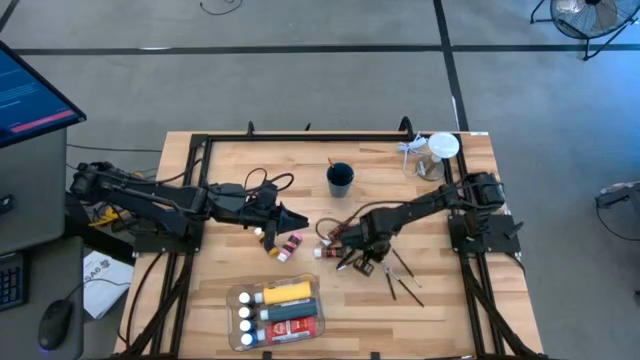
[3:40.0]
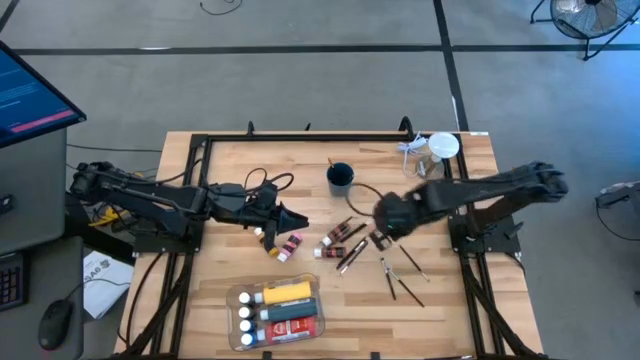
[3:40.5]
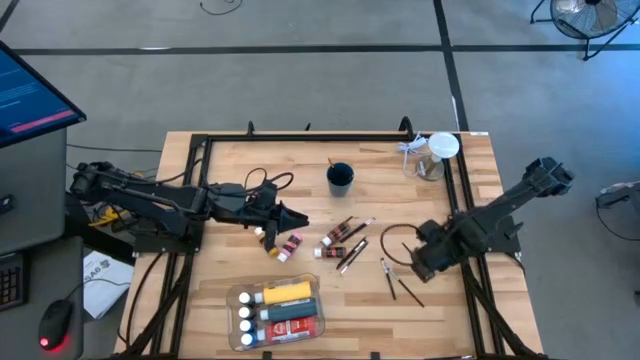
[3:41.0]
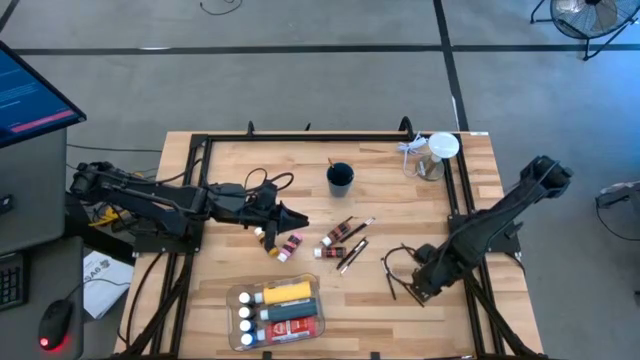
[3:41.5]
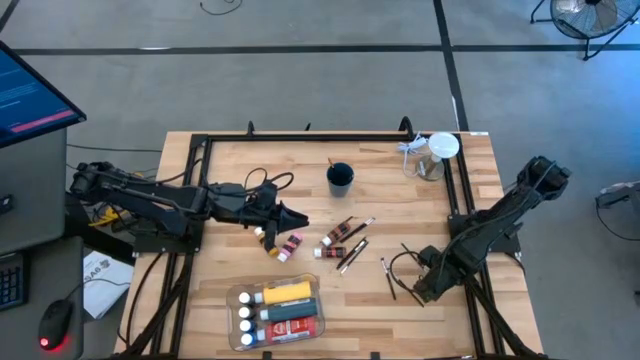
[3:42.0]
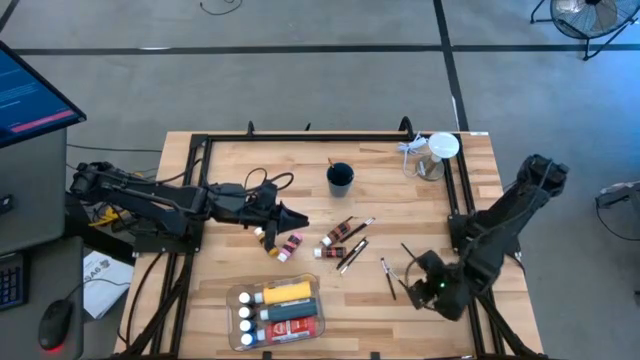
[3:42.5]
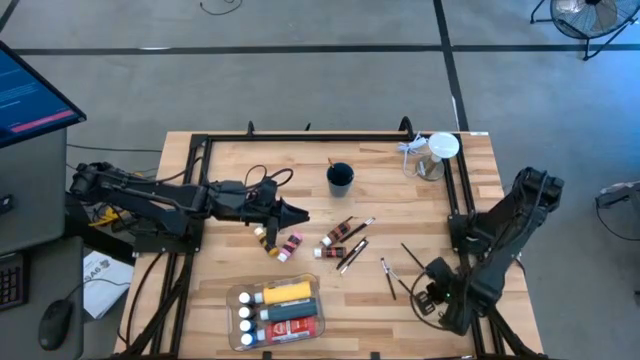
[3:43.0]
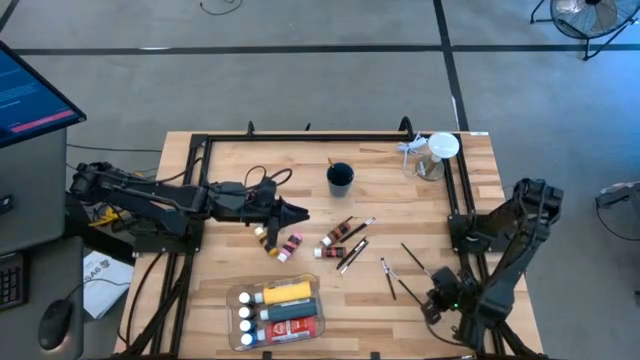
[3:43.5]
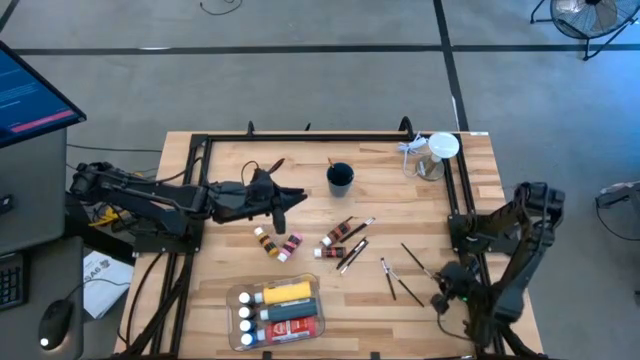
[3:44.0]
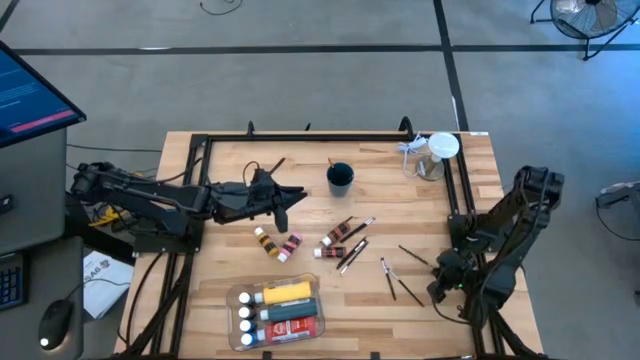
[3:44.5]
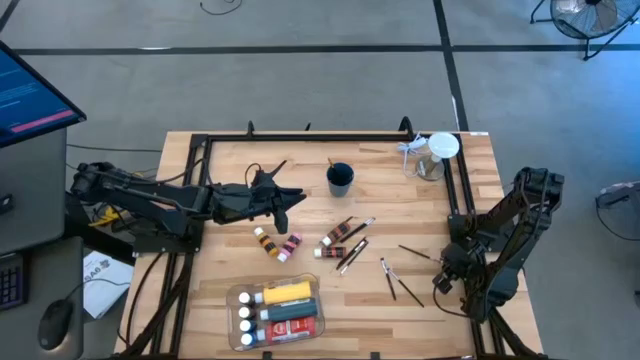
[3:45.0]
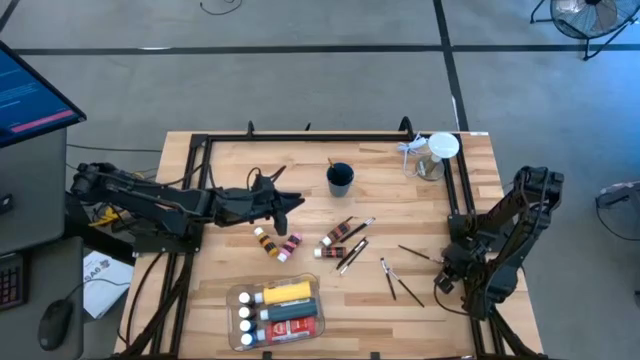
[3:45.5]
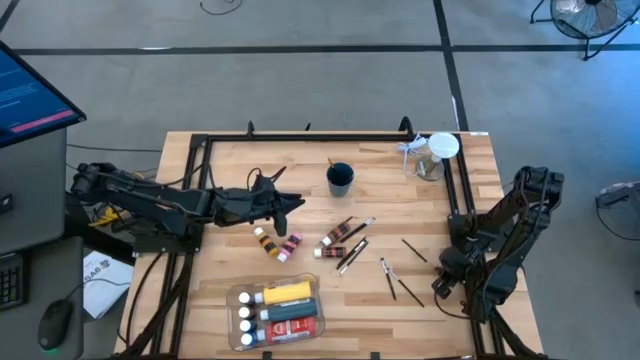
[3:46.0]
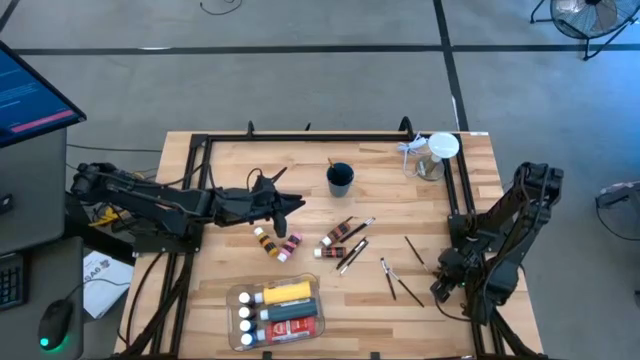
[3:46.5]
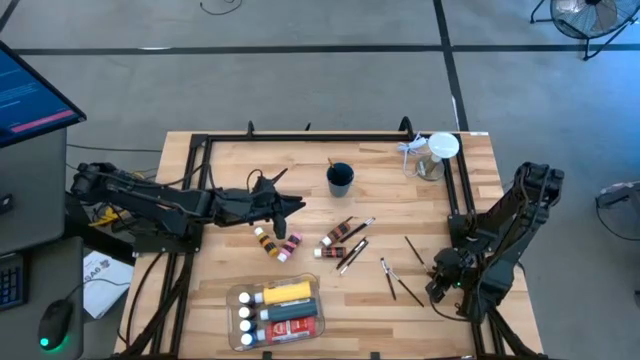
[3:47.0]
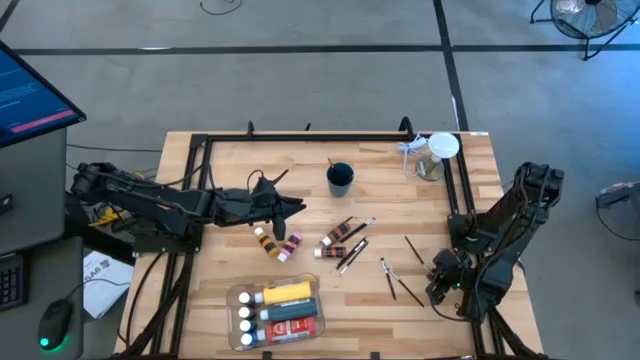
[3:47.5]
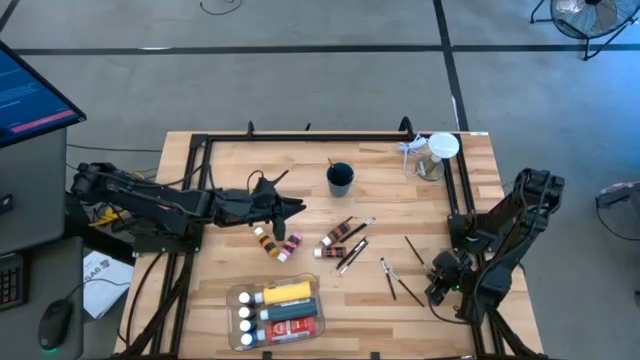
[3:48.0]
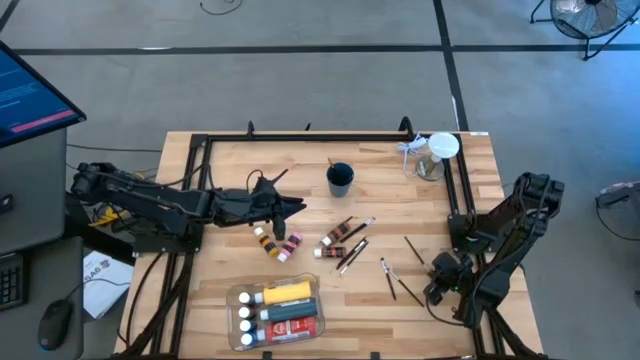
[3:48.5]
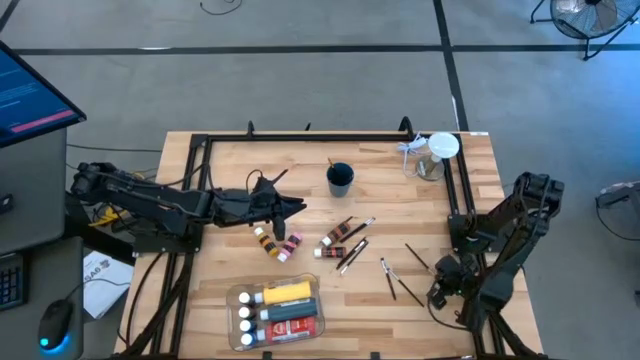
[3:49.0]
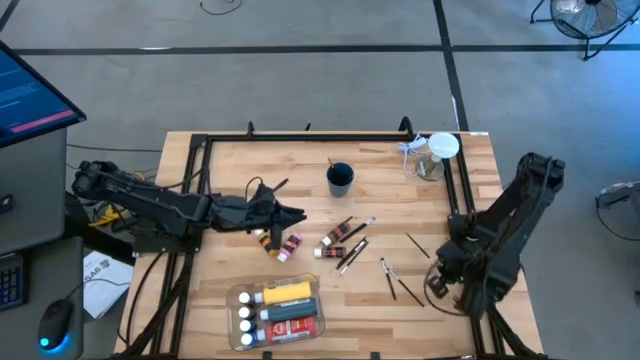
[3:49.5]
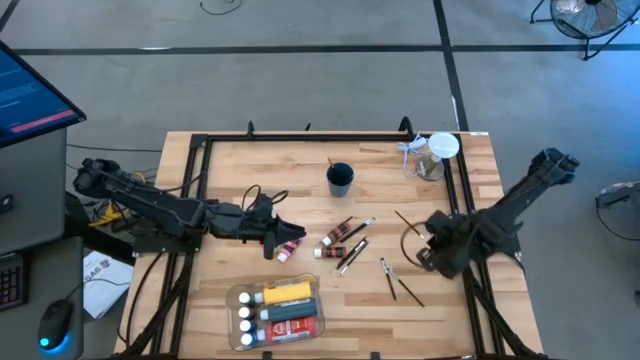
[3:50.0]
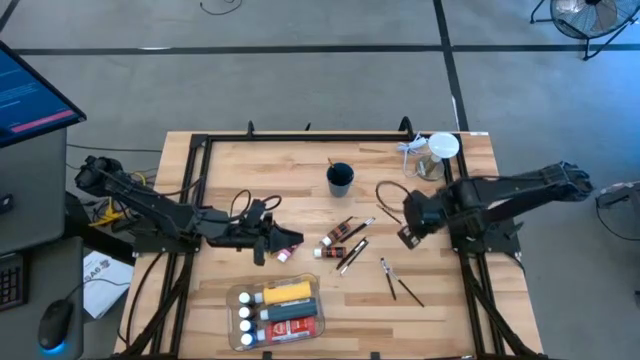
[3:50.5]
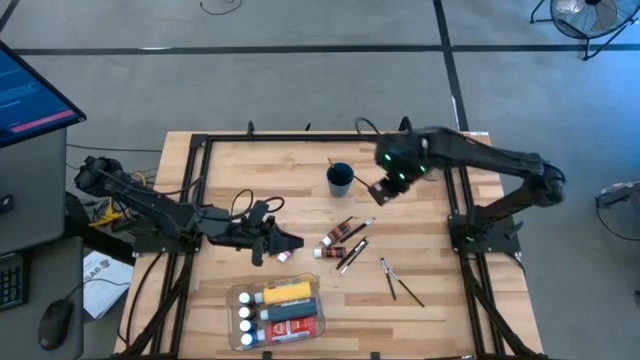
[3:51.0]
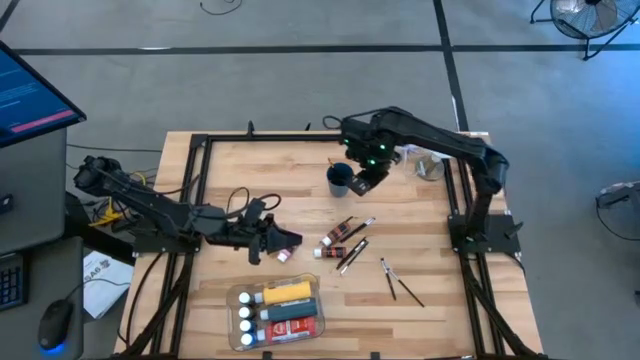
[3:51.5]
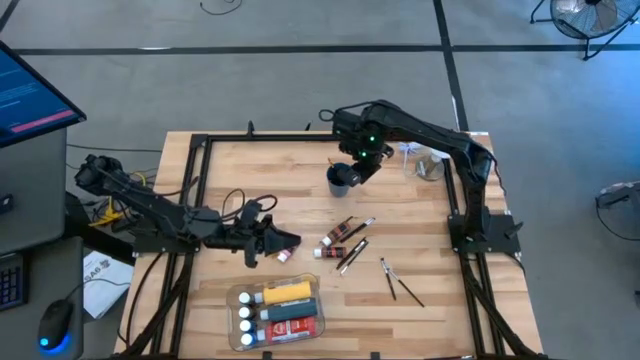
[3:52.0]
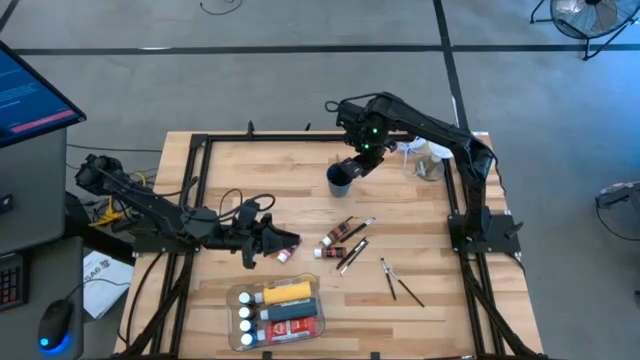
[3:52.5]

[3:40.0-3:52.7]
Task: Pick & Place Paint Supplies
Put the paint brush into the blue cup

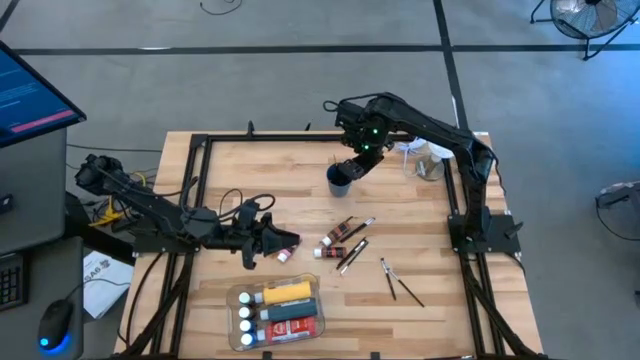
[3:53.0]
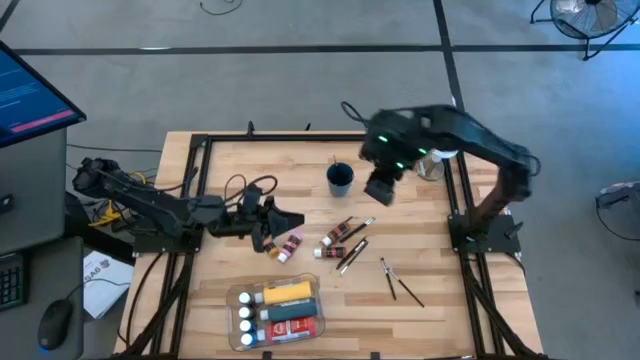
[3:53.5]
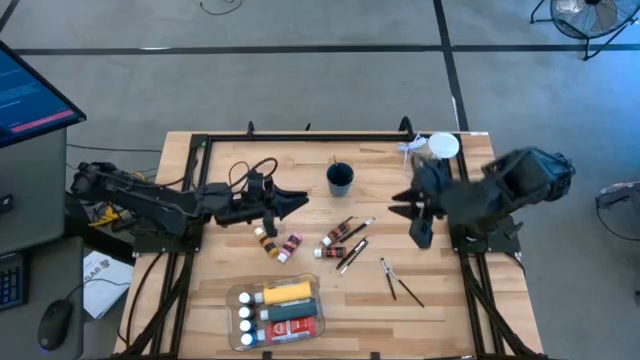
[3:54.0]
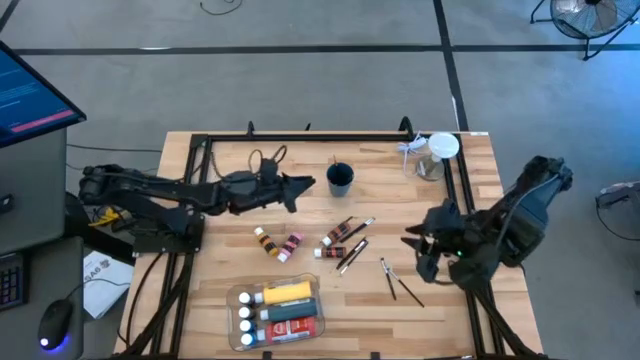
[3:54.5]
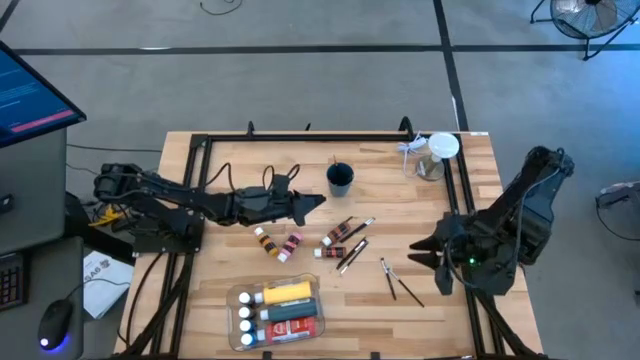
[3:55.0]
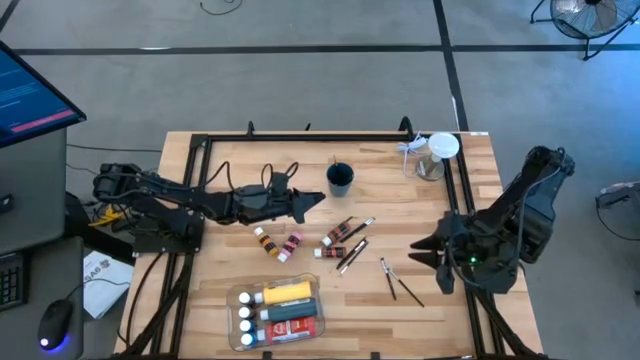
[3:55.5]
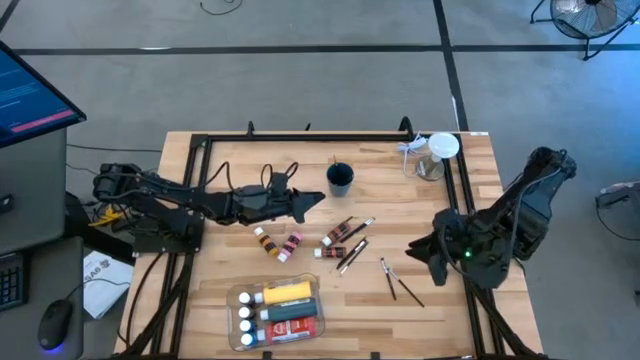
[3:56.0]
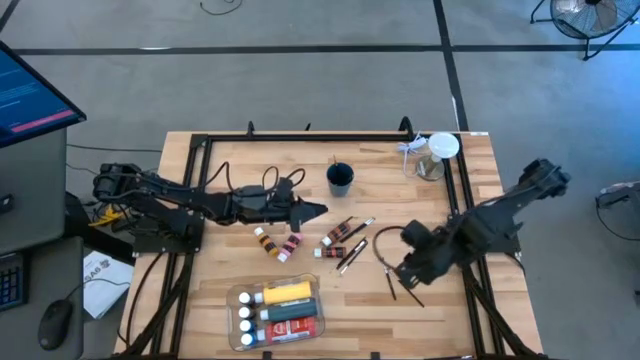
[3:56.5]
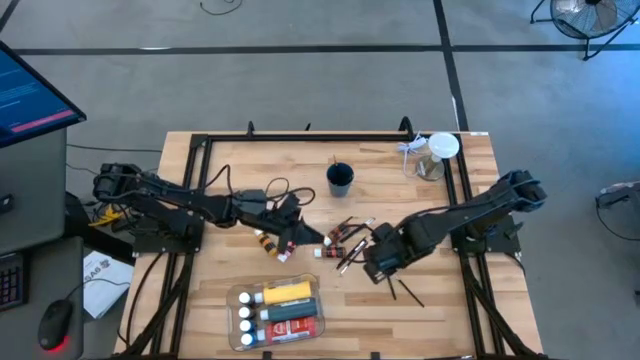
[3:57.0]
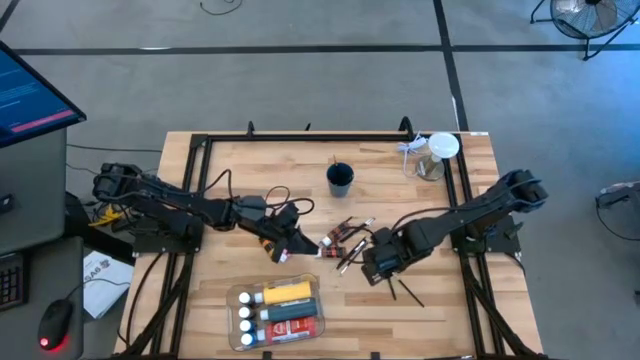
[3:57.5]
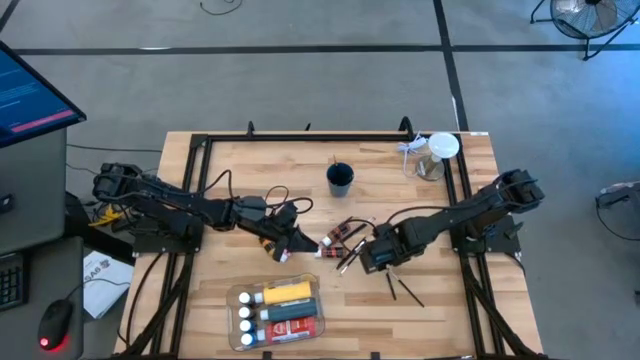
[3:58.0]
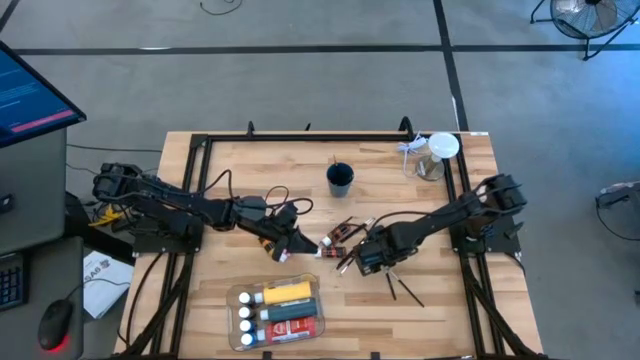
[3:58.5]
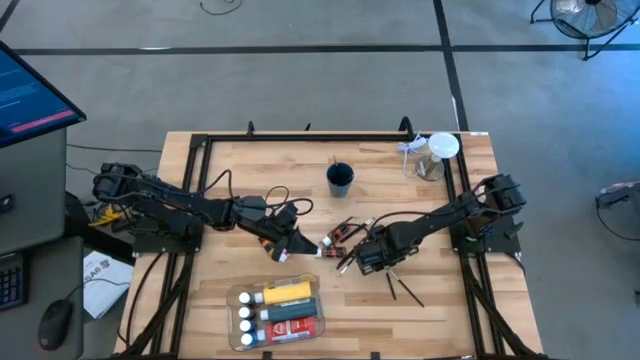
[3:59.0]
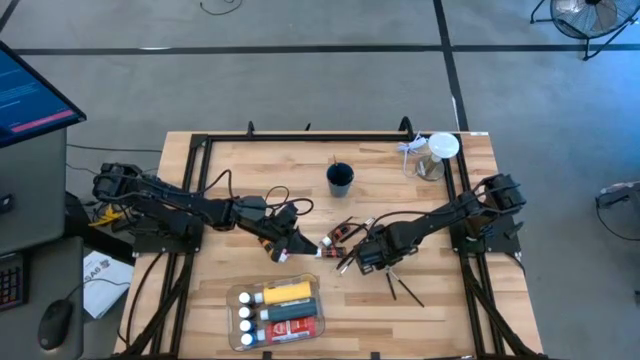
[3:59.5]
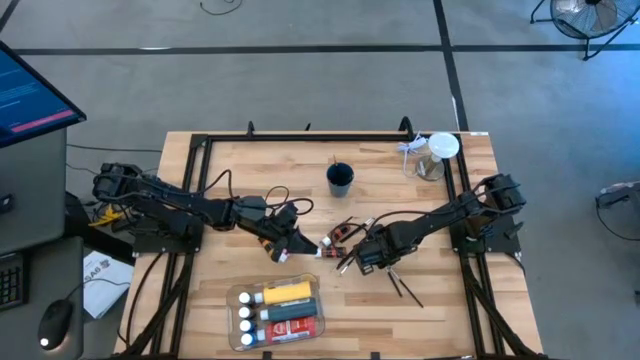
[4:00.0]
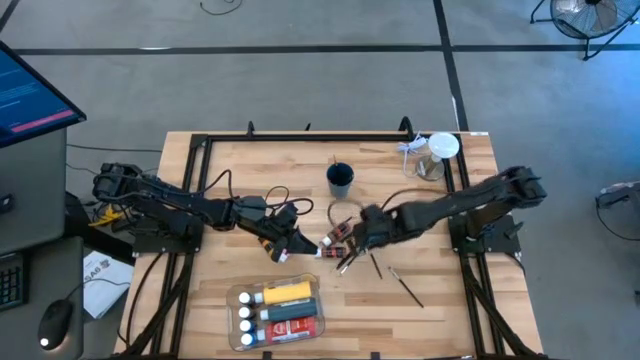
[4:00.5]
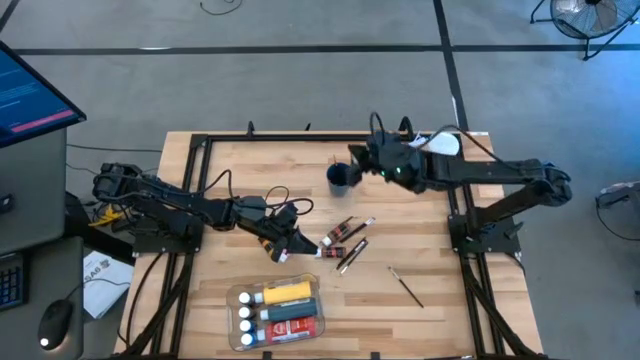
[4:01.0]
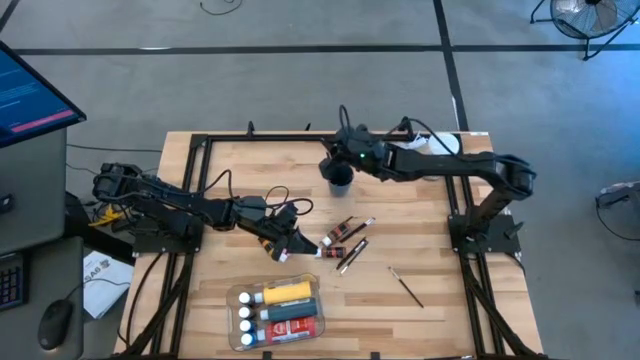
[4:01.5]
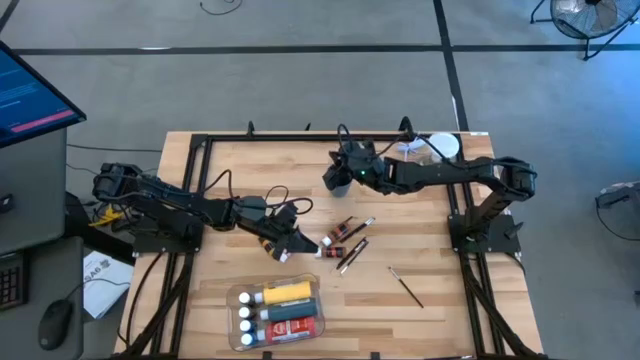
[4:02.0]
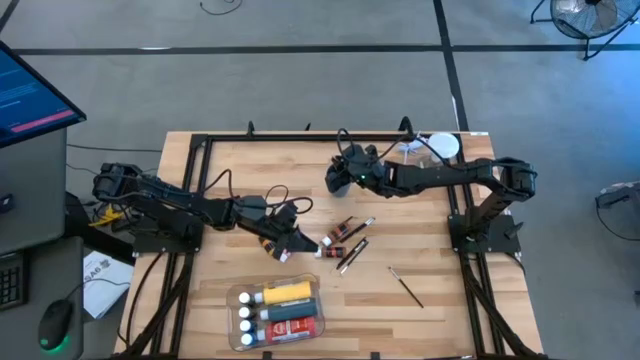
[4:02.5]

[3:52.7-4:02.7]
Put the paint brush into the blue cup
